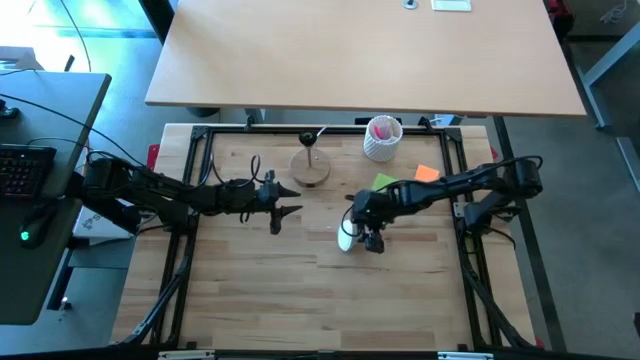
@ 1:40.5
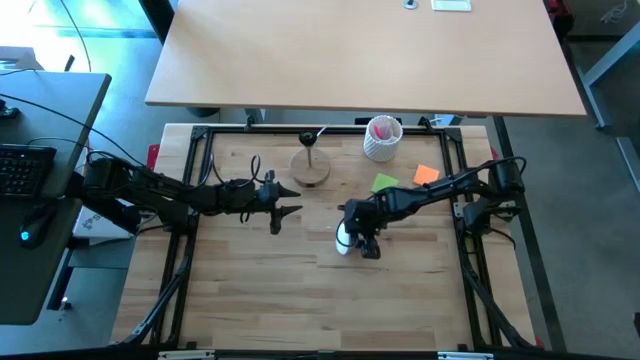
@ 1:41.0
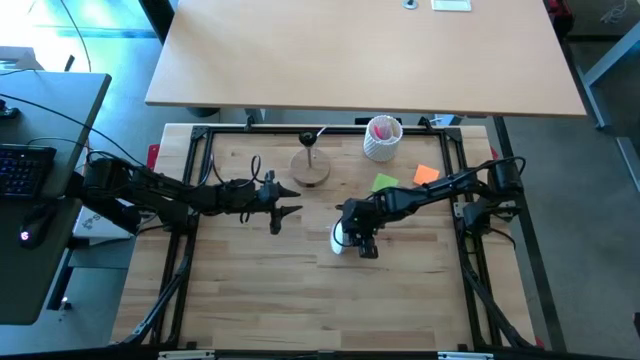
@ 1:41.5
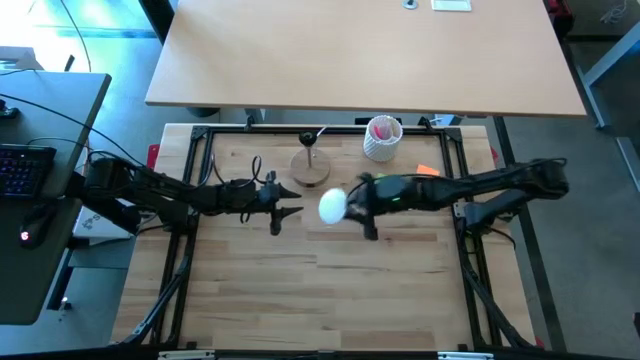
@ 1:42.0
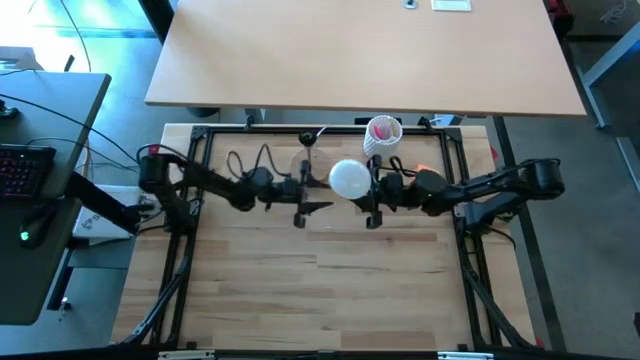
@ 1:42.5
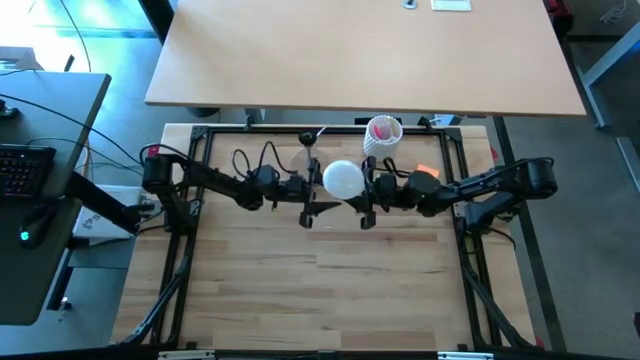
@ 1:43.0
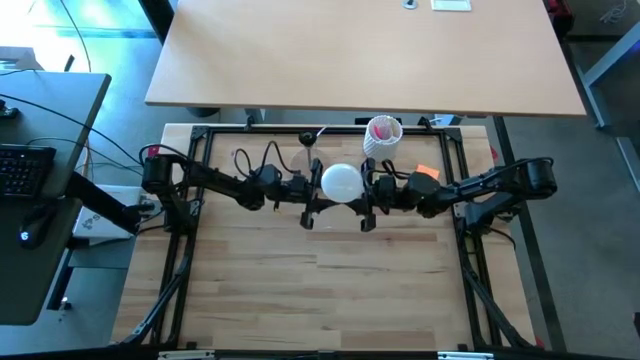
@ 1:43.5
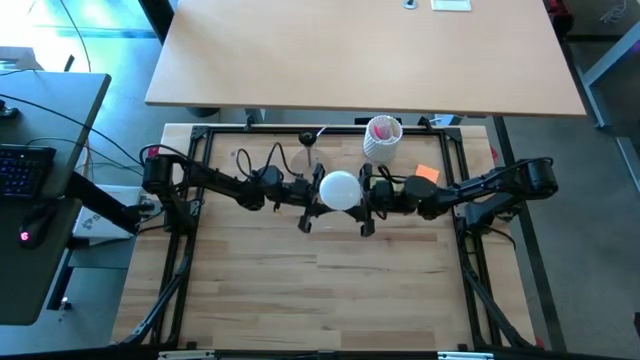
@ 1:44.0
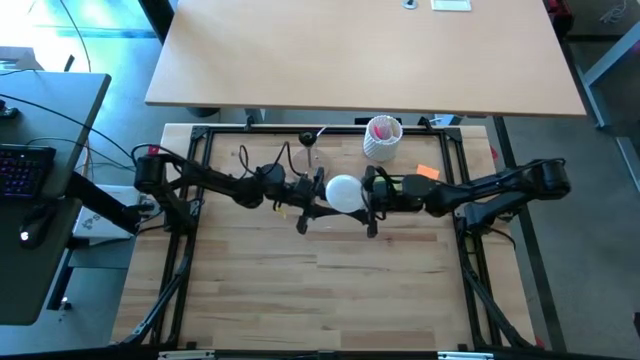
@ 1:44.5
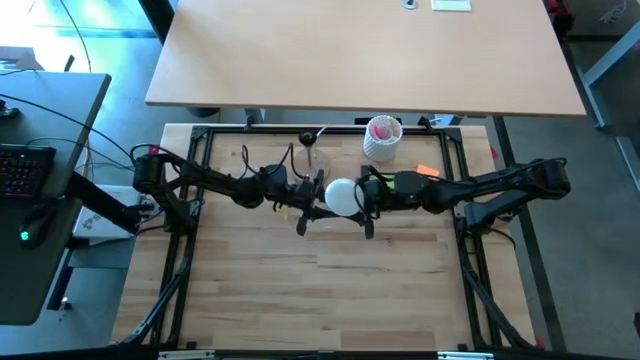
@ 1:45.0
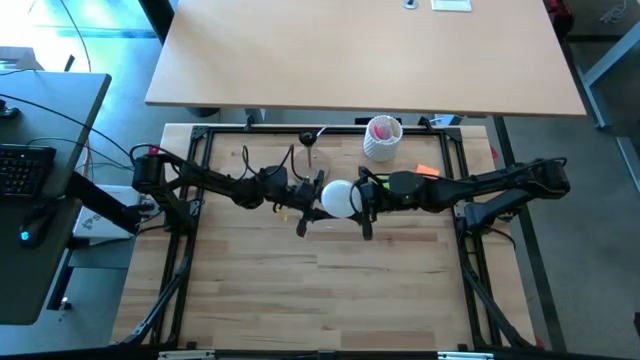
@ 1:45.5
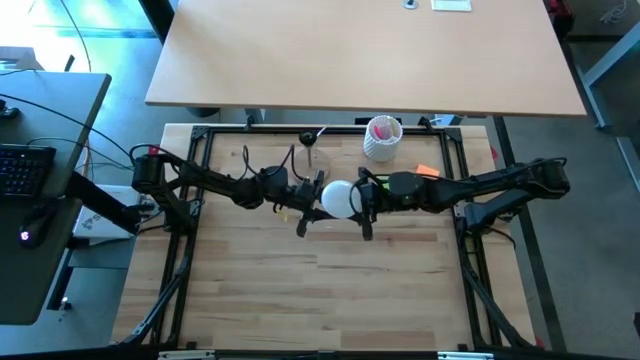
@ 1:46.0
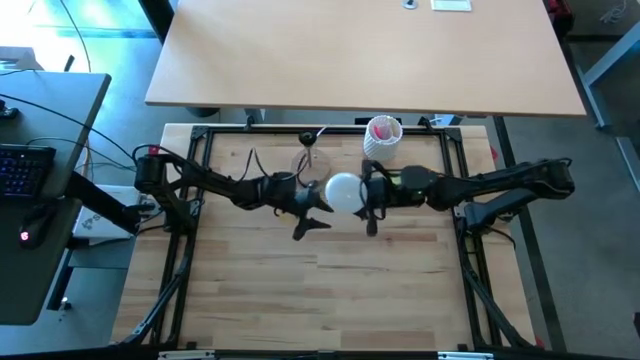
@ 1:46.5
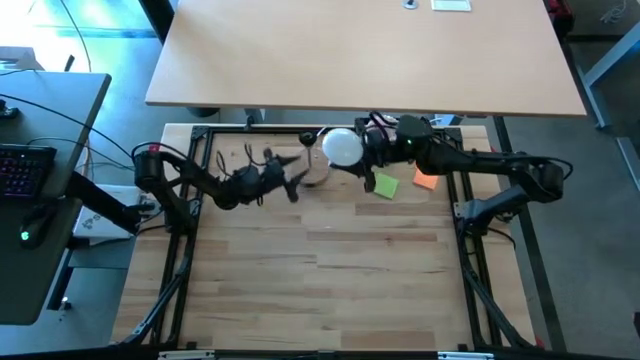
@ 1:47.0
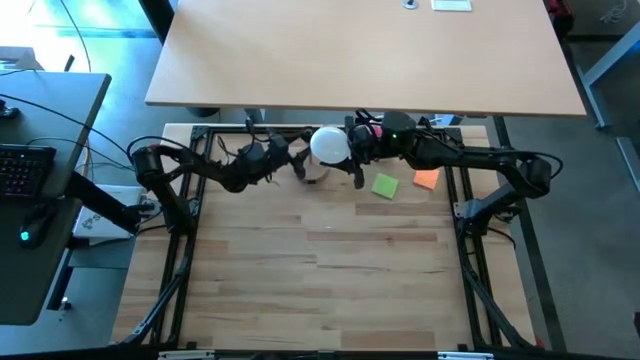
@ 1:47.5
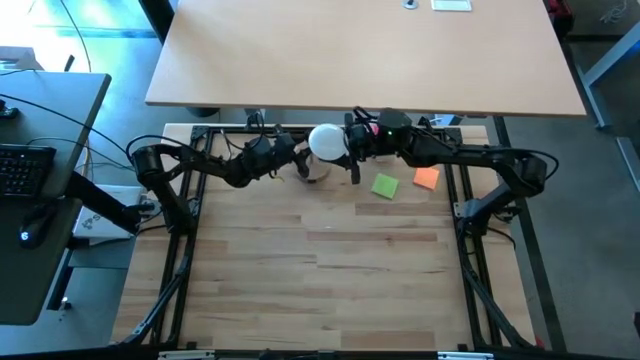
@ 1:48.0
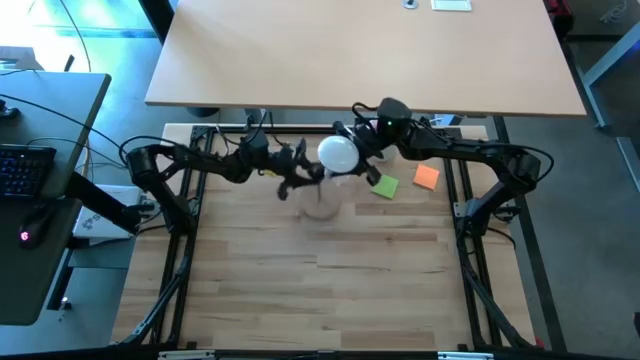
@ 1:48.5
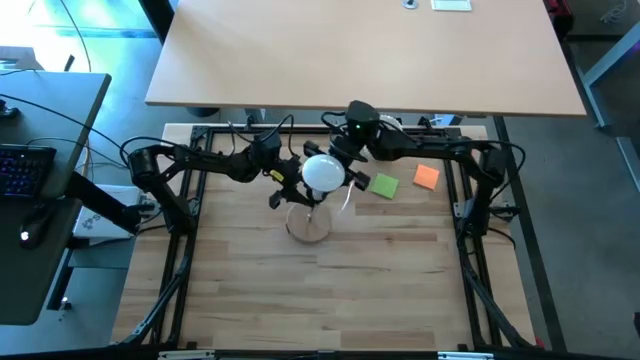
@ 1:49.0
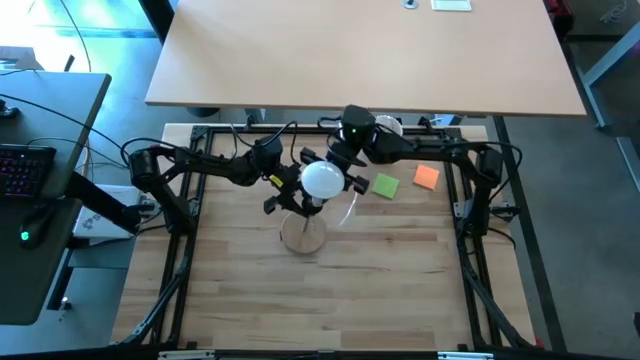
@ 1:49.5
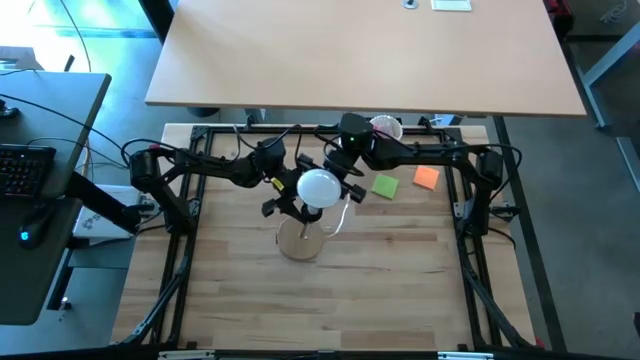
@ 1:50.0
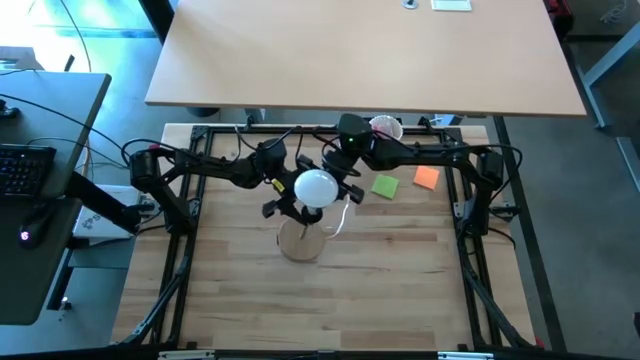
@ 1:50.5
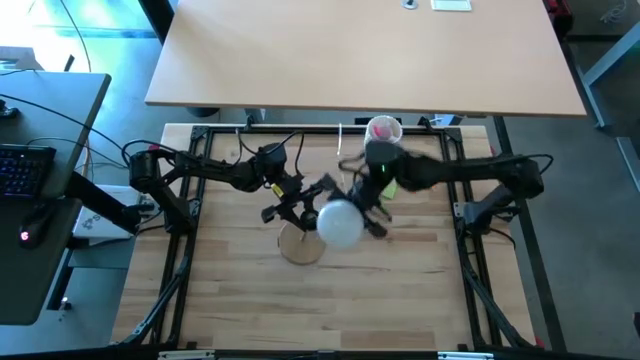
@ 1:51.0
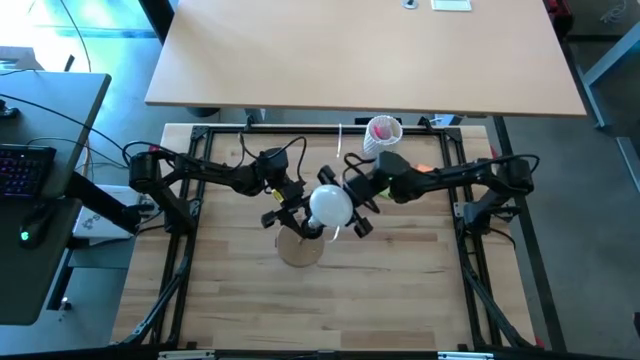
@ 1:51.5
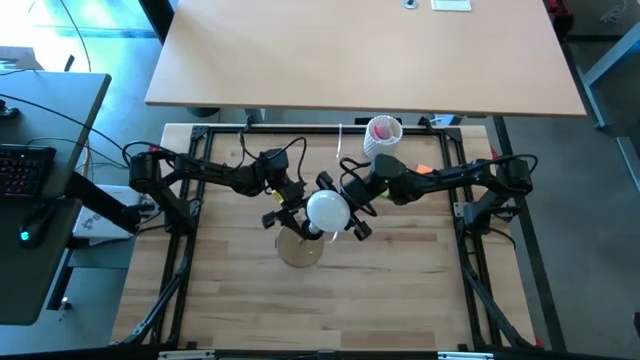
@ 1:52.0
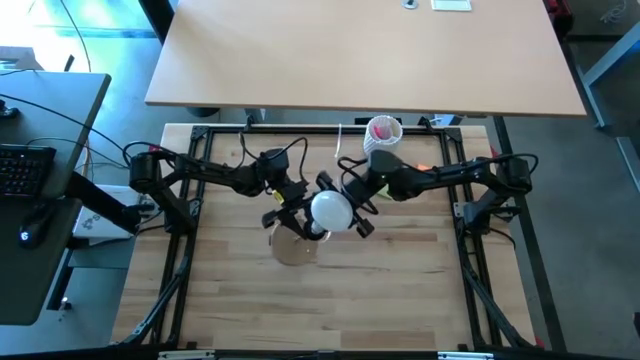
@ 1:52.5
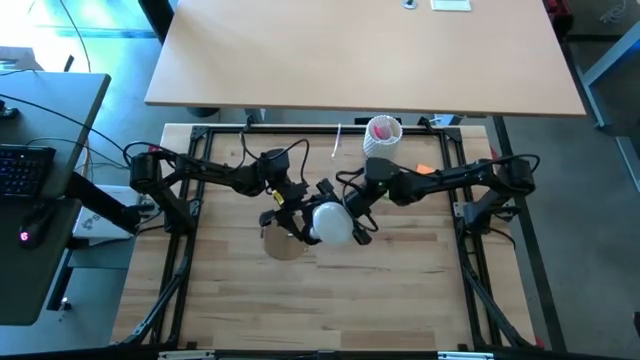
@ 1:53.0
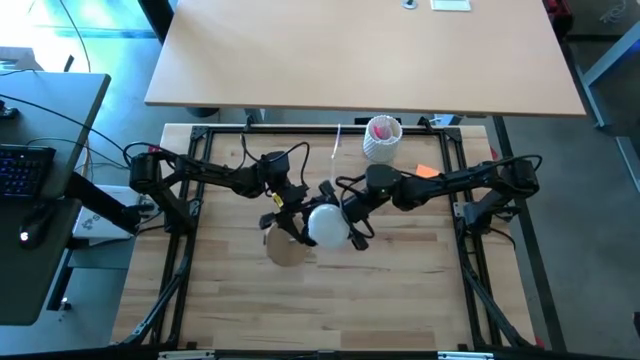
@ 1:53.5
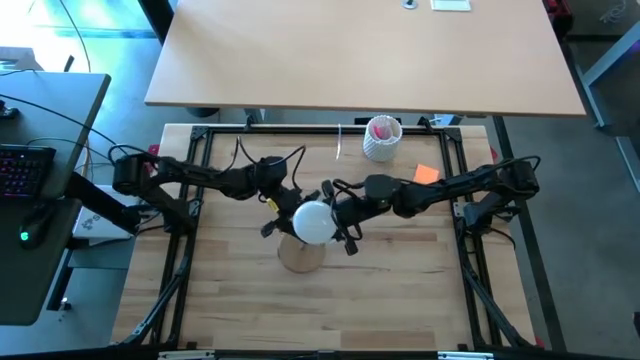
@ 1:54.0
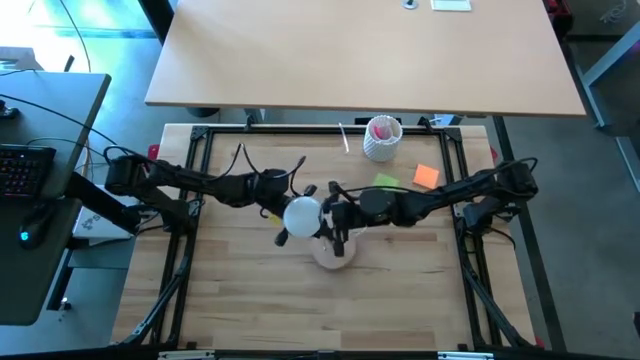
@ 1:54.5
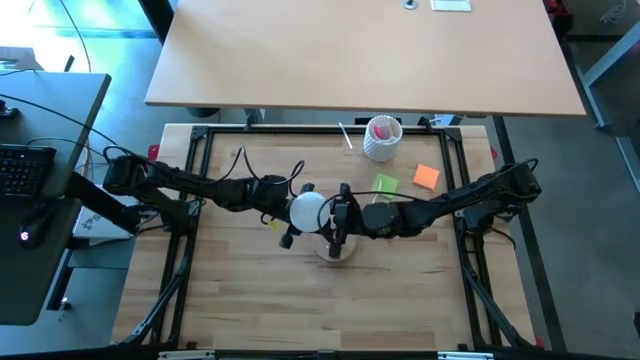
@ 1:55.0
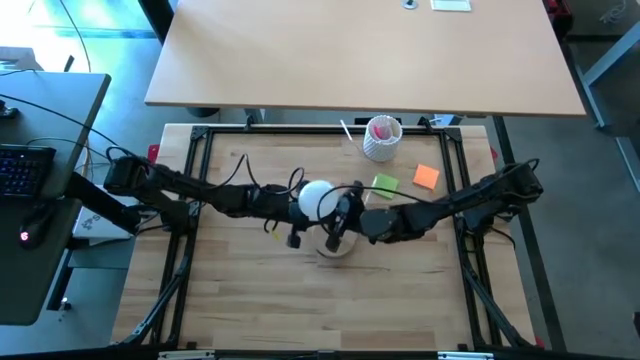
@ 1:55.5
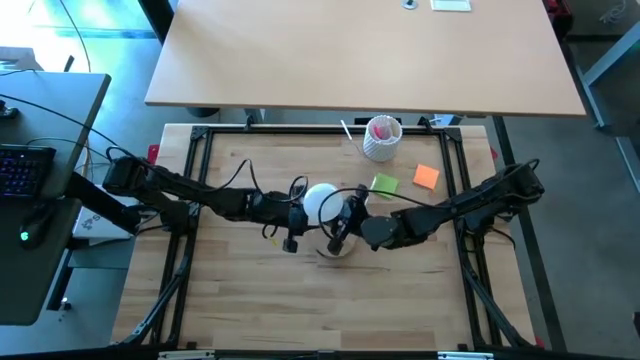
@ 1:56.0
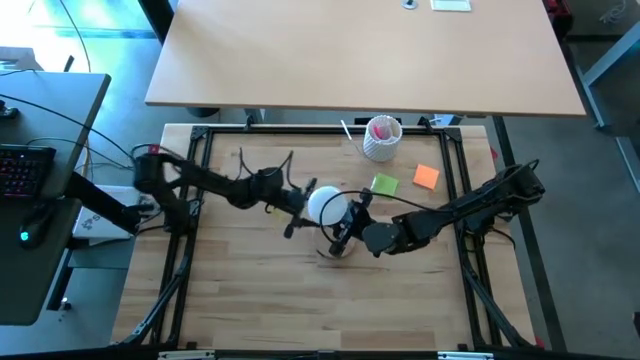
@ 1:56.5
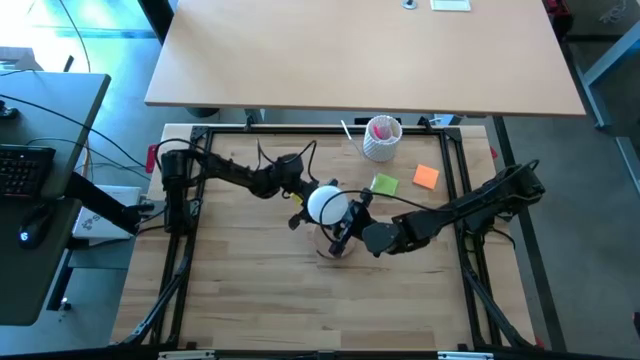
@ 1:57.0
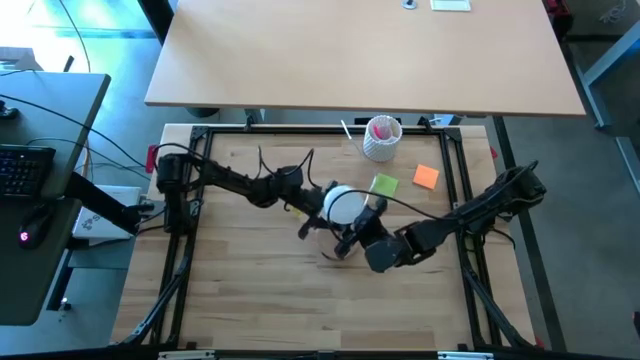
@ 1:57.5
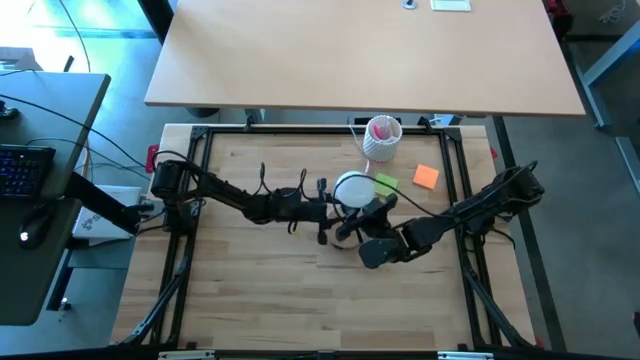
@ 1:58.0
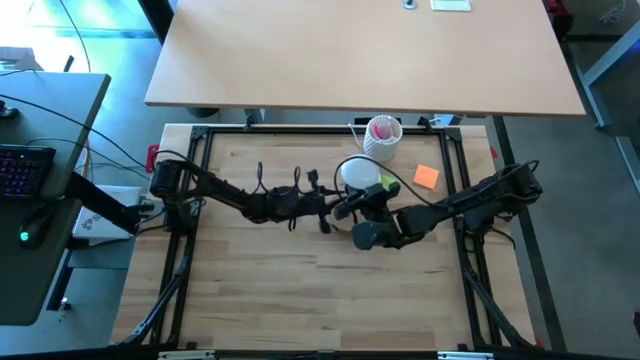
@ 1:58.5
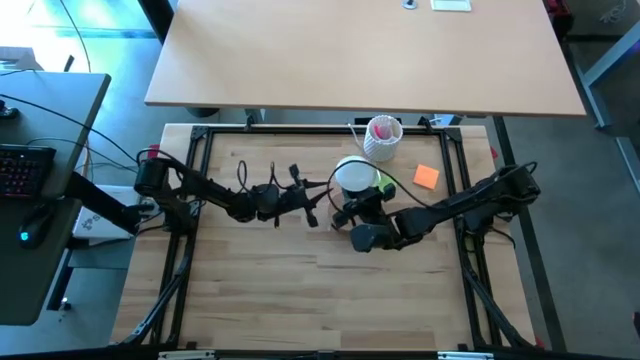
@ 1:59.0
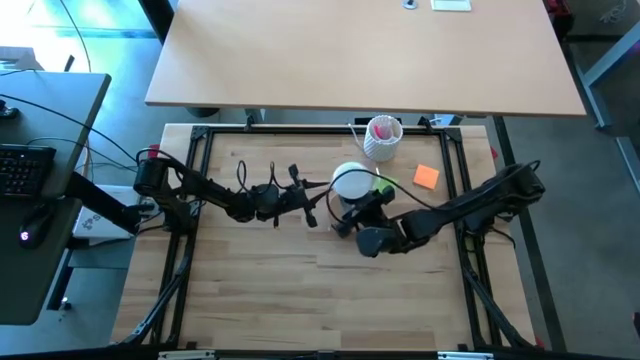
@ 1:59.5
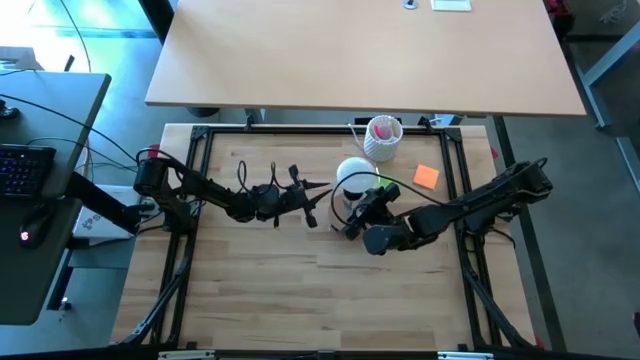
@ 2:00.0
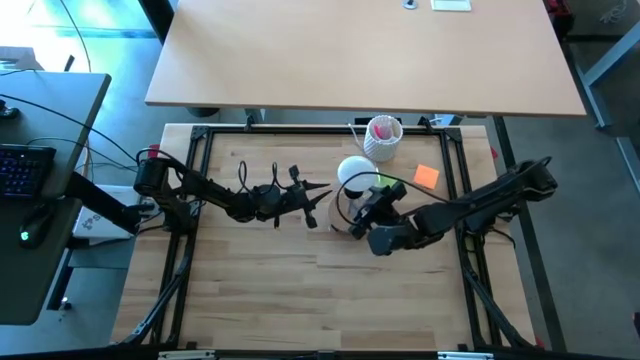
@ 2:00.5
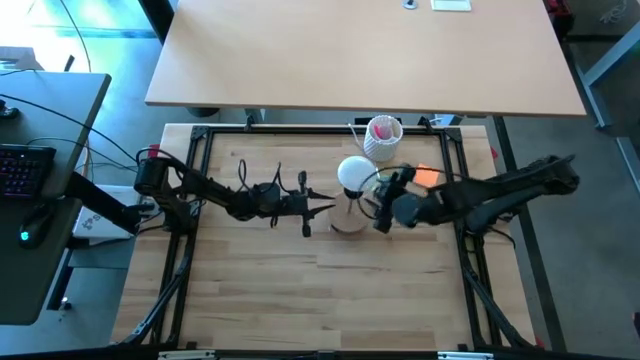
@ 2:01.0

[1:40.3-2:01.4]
Task: Screw lightbulb
Insert the lightbulb into the lamp socket

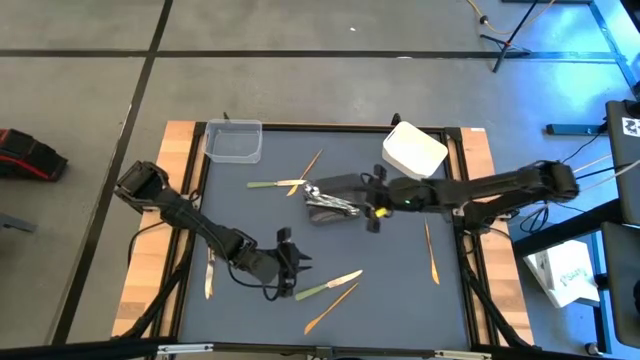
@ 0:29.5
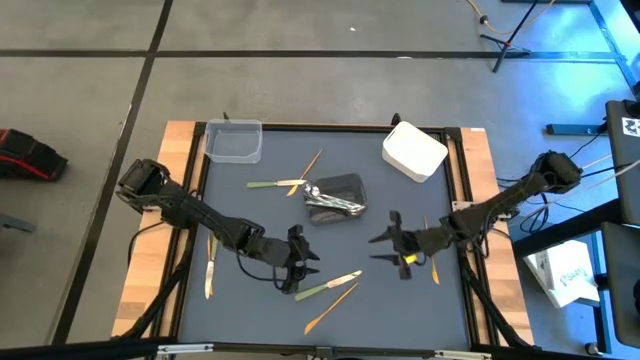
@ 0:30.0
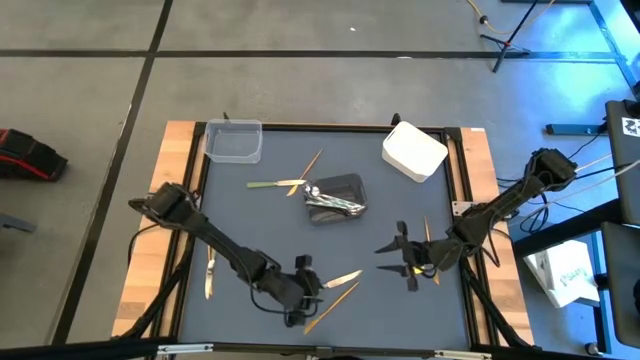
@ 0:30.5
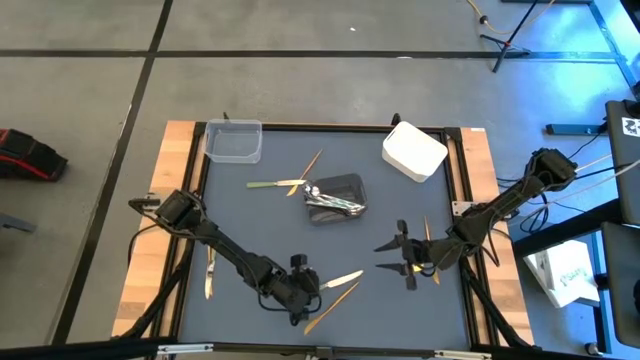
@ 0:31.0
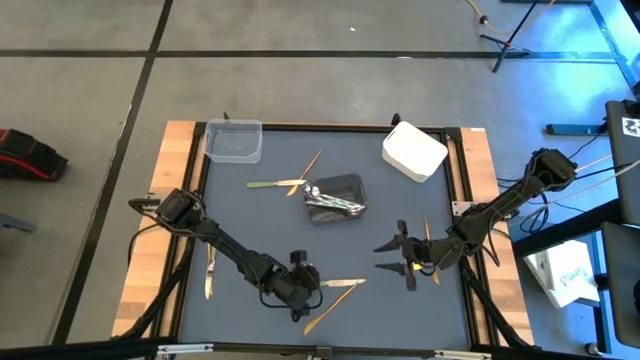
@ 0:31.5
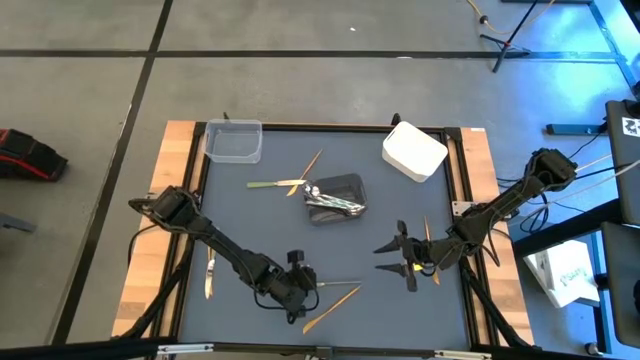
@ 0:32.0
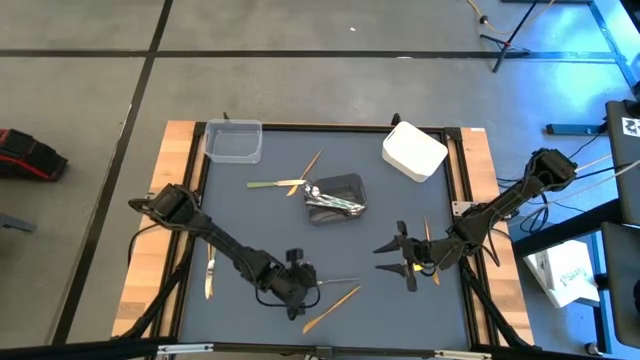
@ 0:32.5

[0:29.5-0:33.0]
Task: Sort silverware by color (type)
Put the bottom green table knife into the transparent bin
